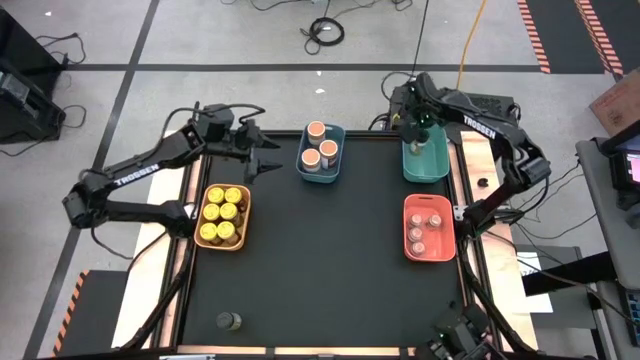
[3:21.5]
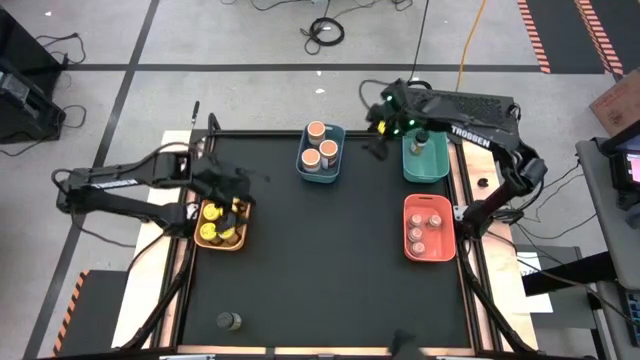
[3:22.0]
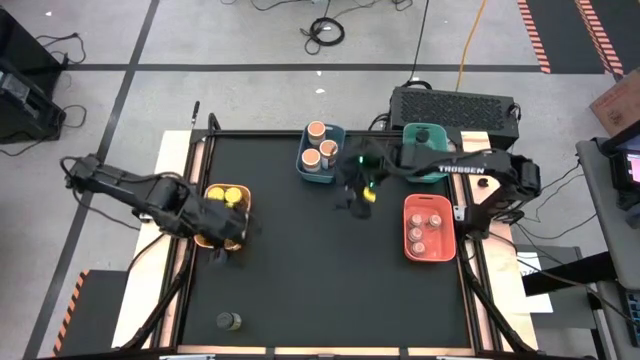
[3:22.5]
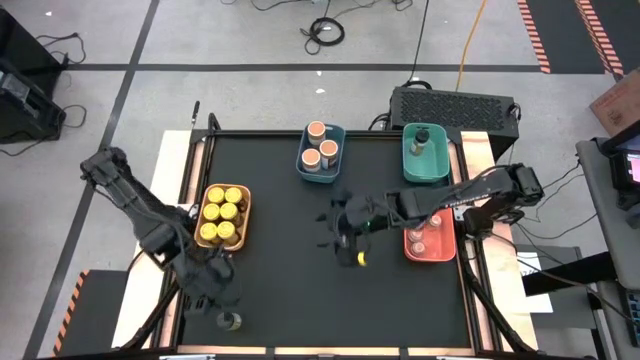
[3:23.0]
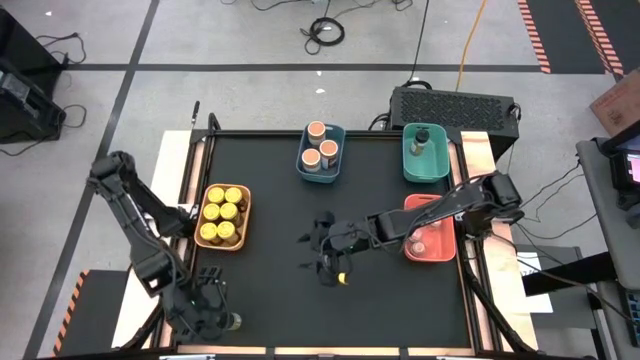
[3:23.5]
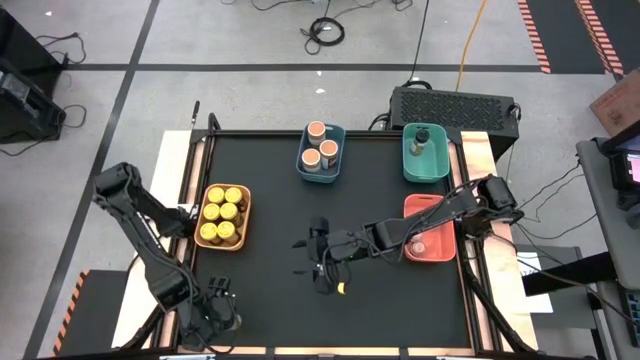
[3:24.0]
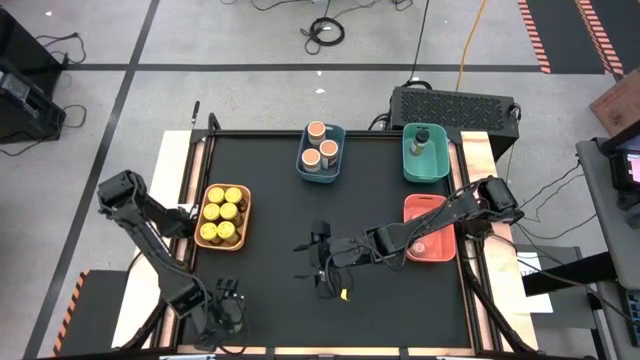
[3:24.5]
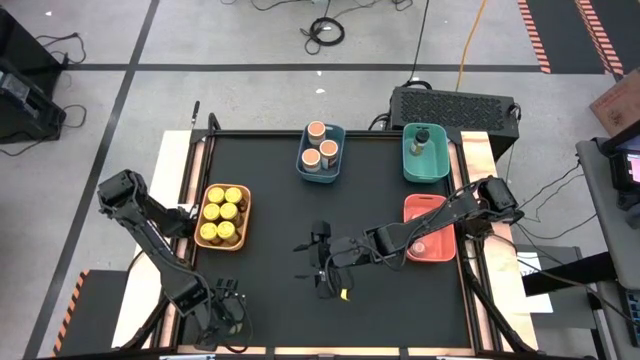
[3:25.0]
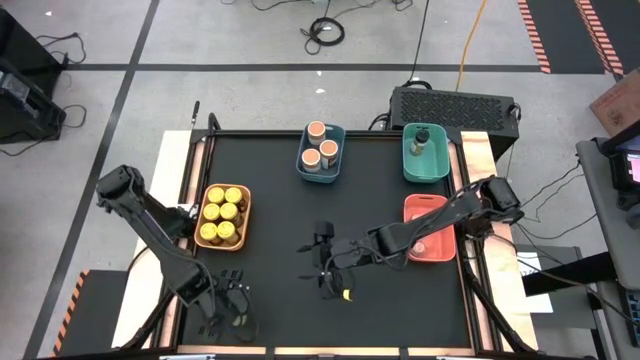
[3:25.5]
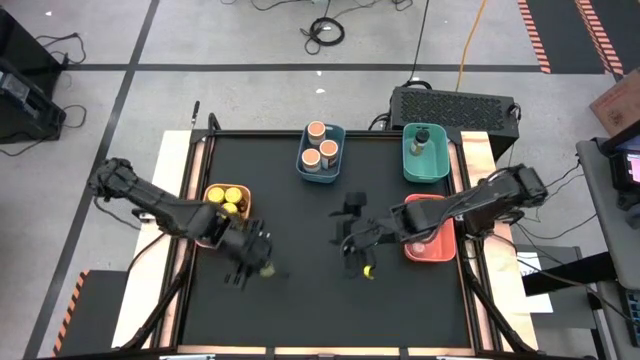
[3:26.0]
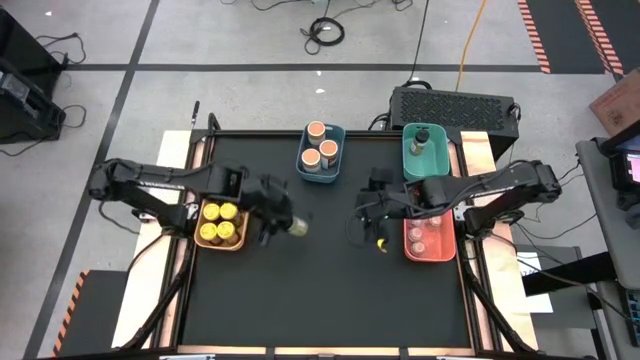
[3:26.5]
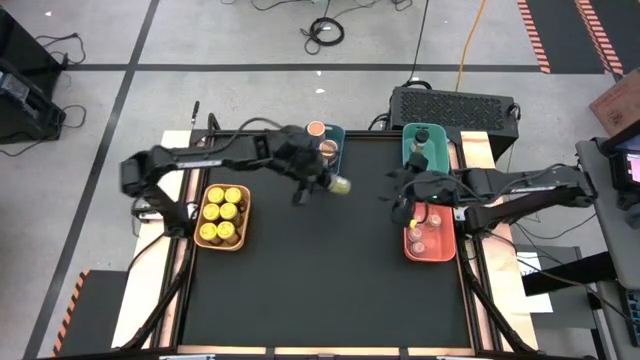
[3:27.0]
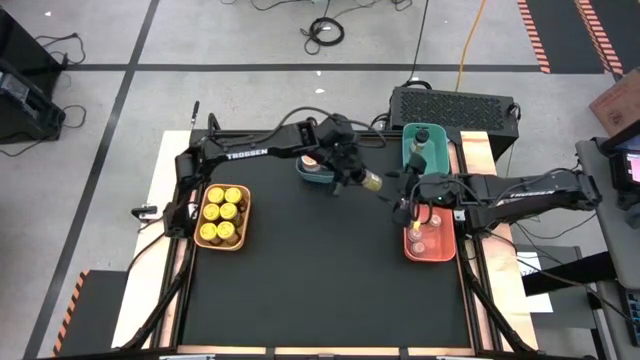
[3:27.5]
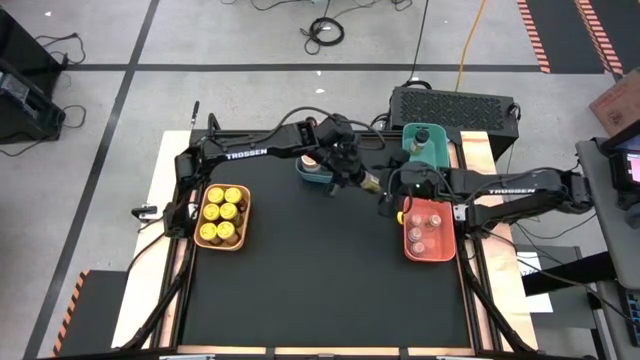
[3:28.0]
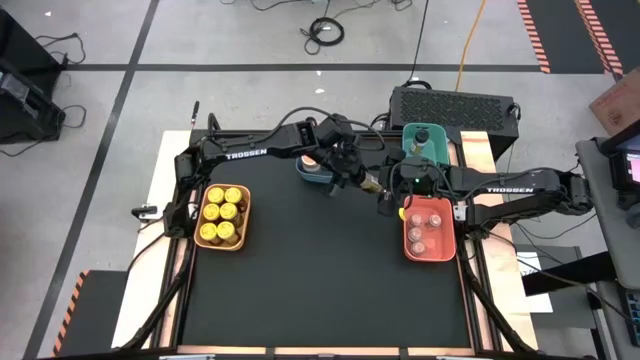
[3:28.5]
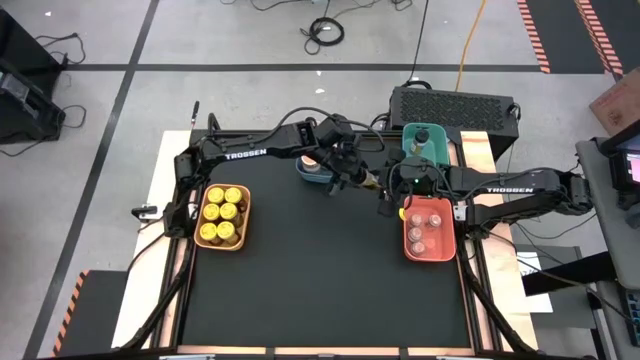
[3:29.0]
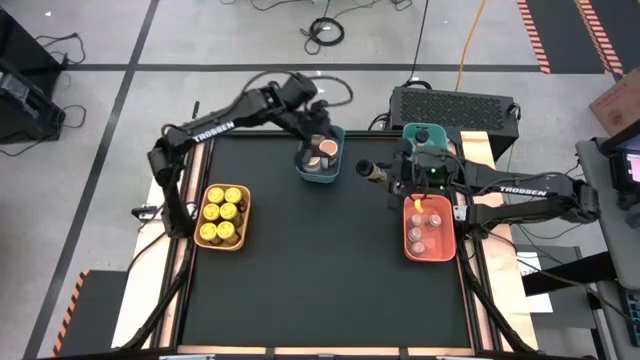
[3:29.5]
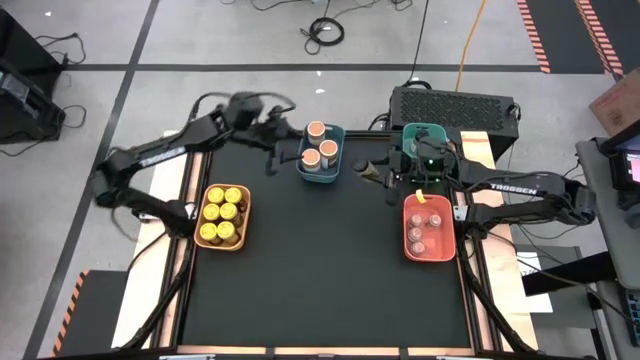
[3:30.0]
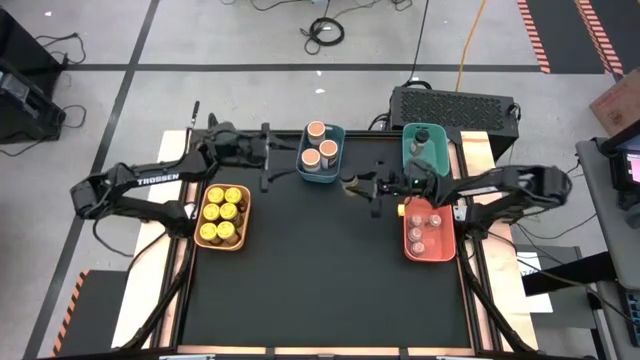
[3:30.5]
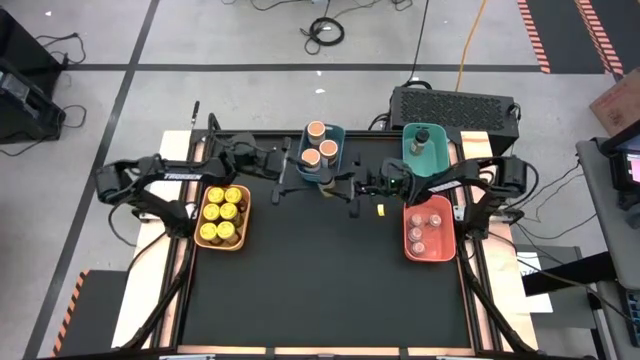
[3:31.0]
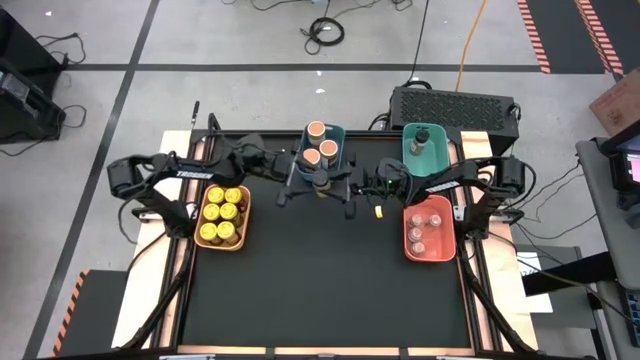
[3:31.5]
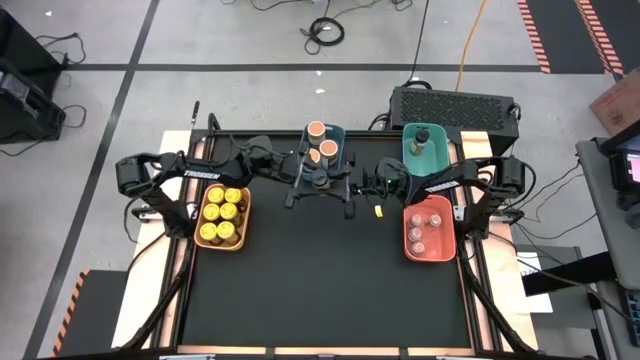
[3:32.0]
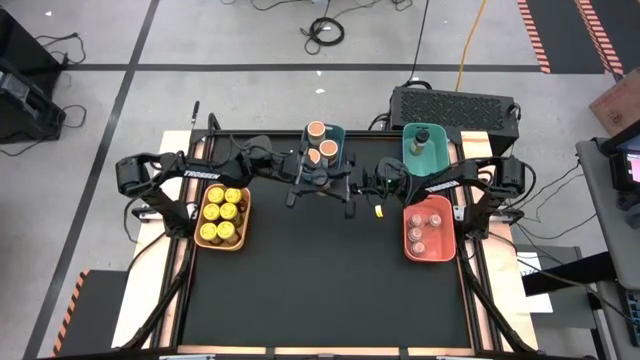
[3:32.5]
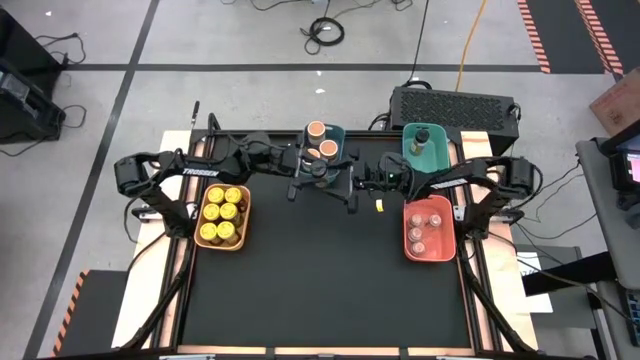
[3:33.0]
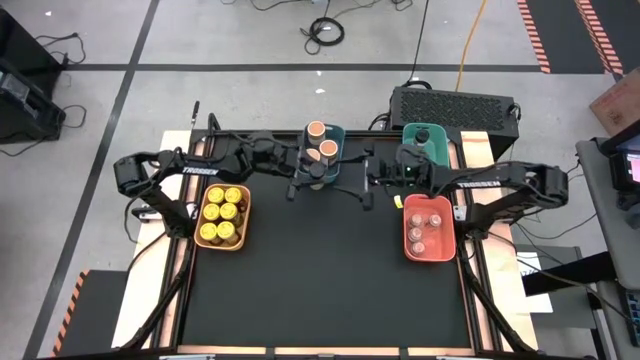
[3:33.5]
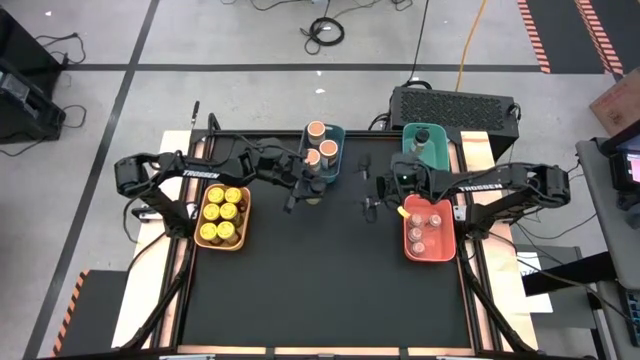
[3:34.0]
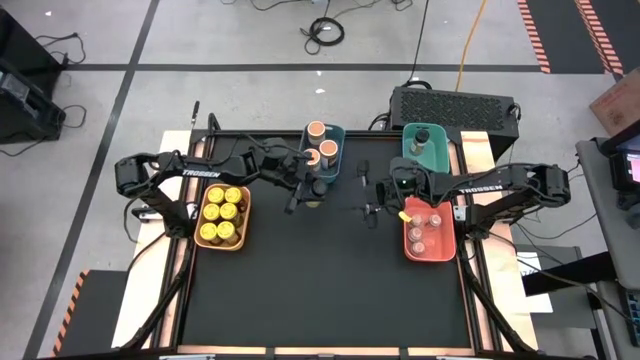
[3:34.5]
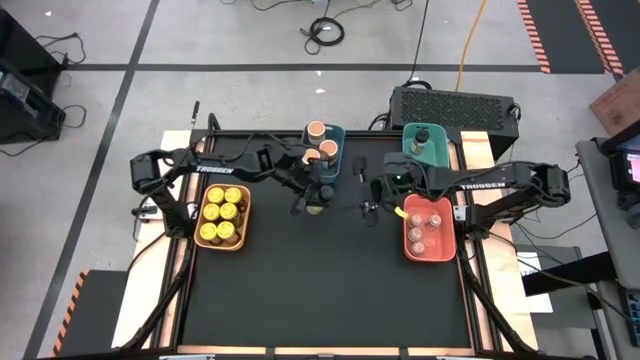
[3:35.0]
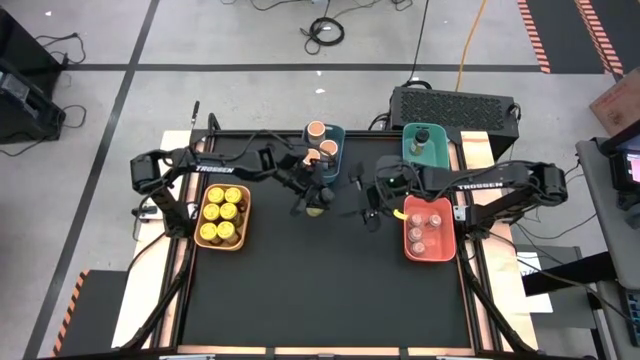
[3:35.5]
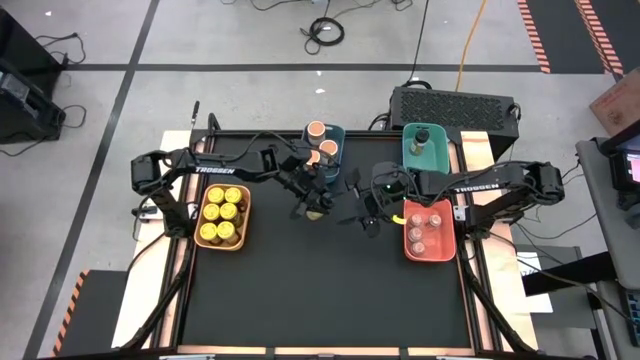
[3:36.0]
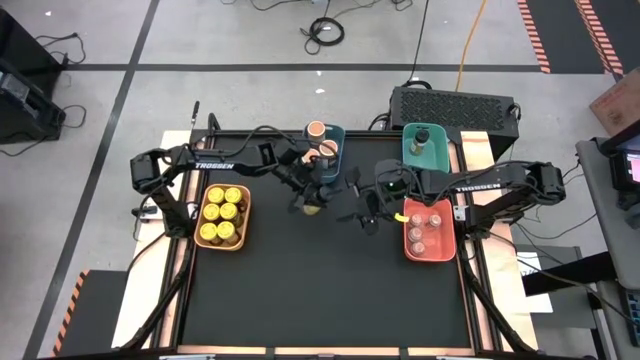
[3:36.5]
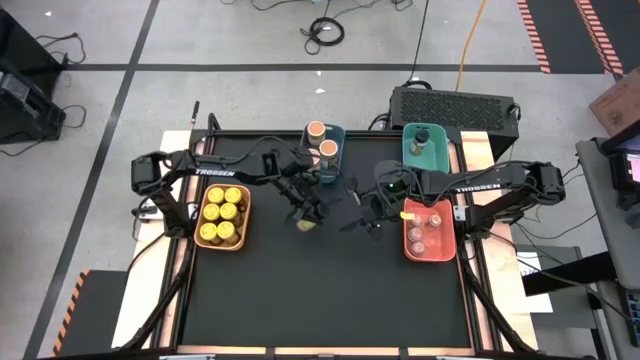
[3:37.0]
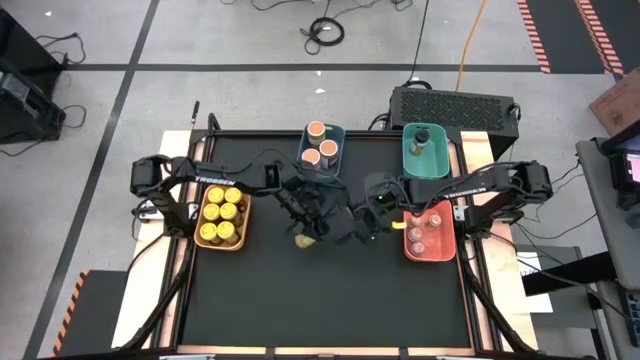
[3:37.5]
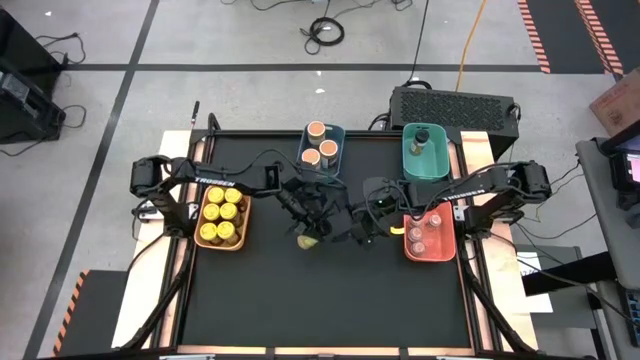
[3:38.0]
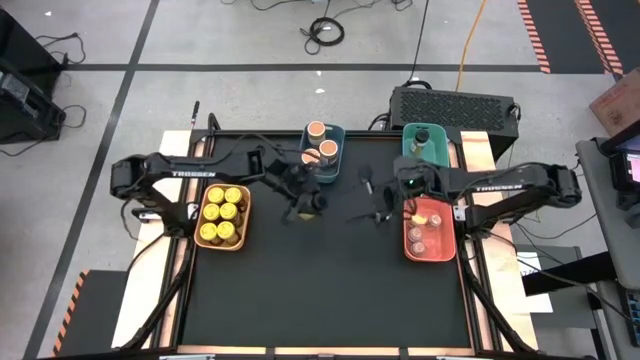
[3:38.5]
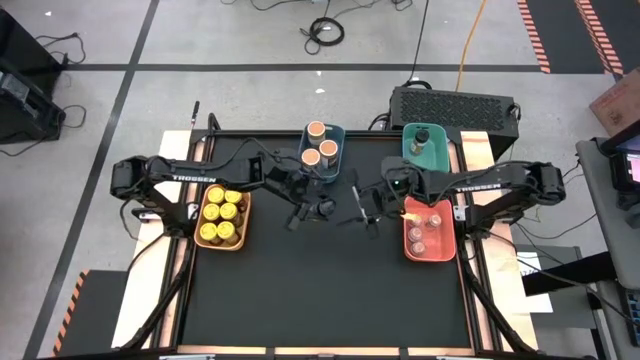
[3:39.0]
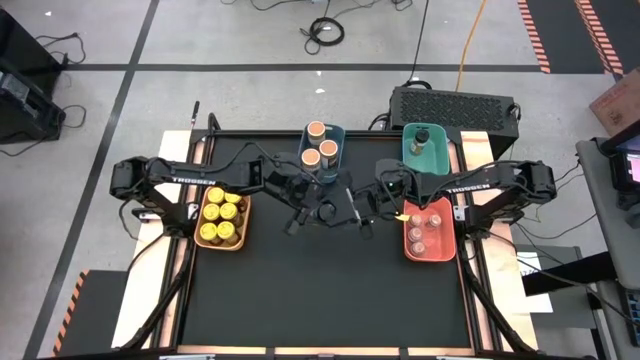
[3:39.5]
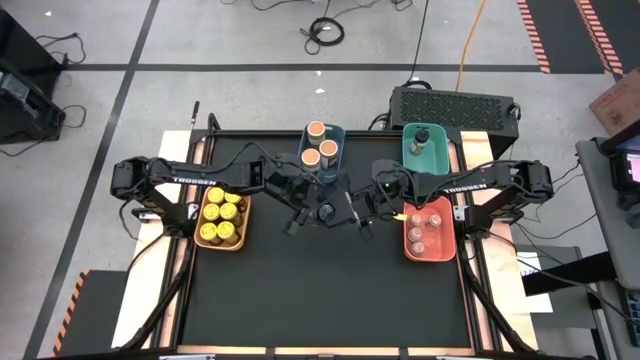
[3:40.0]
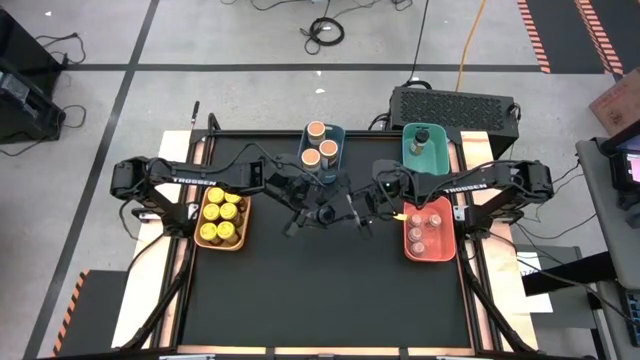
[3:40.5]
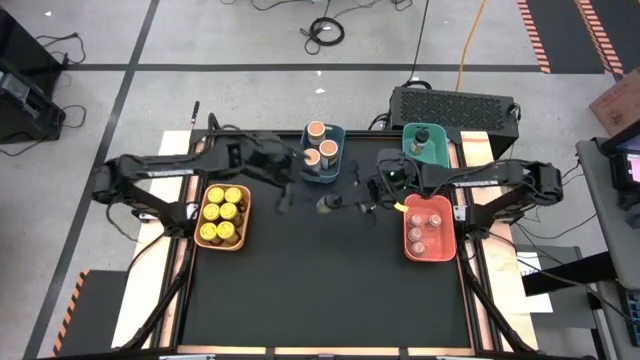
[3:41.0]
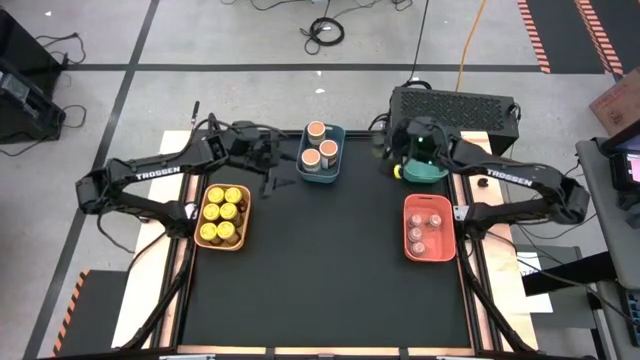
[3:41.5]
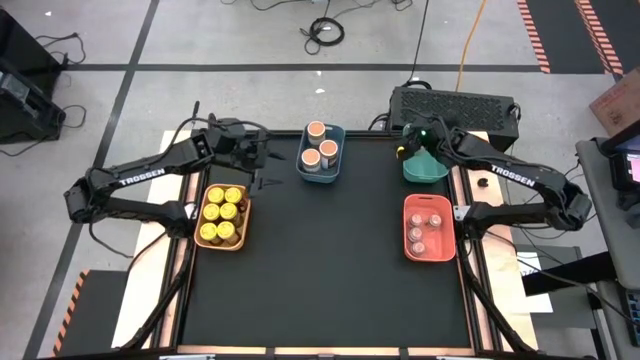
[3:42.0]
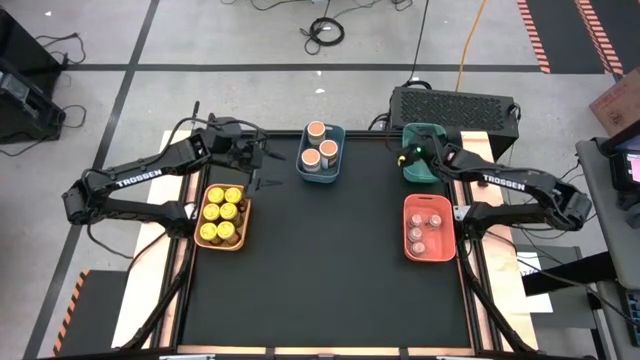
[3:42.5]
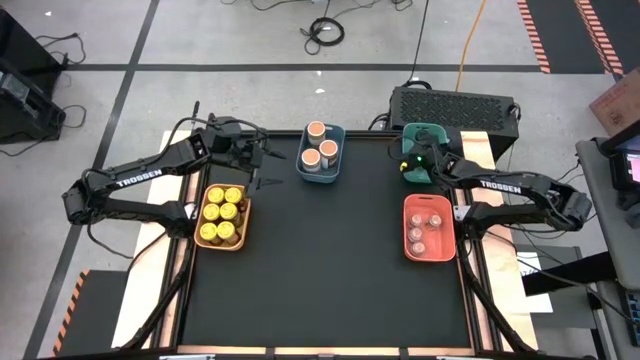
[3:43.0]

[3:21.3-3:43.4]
Task: Sort spices by type
Put the black seasoning bottle into the light green bin

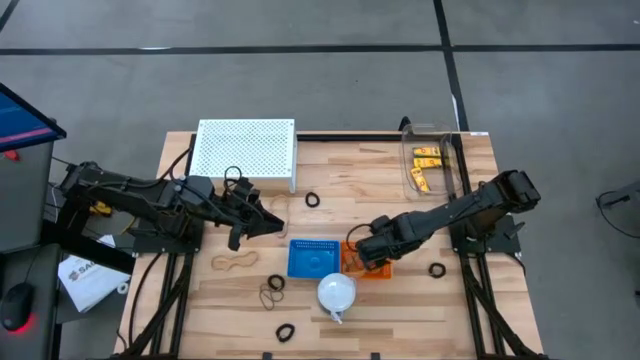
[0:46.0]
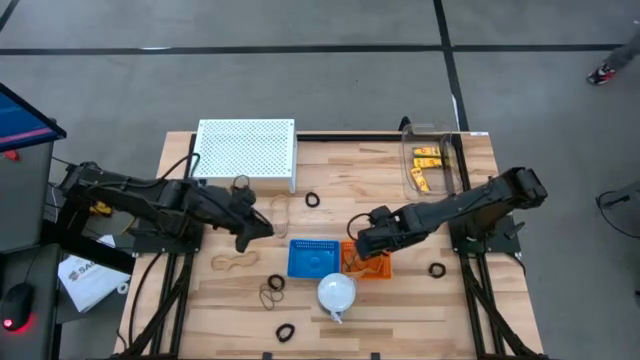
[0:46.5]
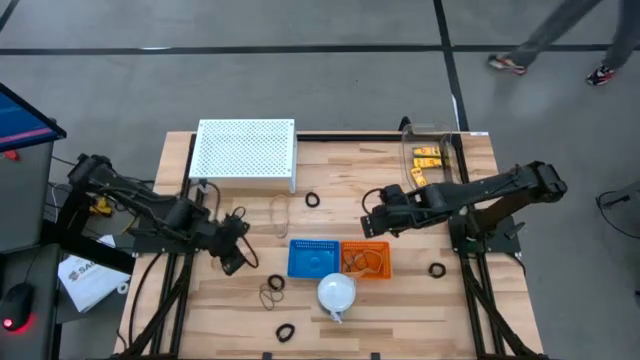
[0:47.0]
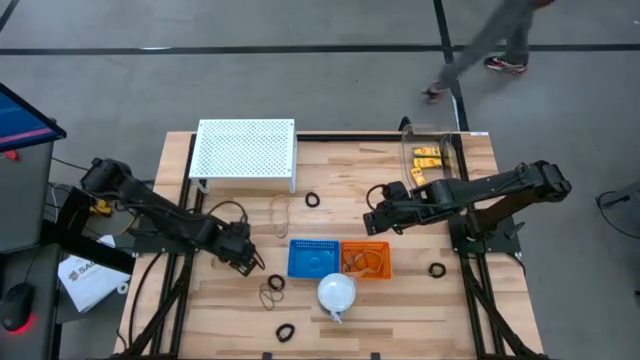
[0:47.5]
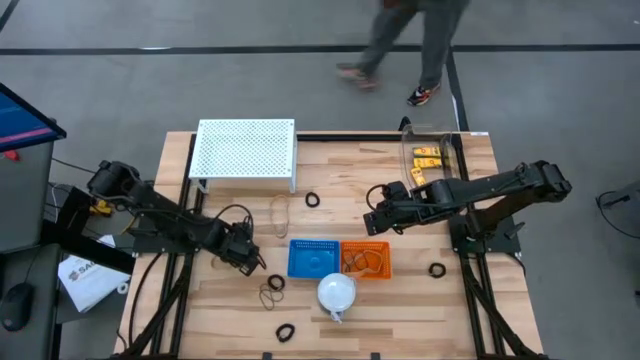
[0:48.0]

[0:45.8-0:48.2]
Task: Pick & Place Office Desk Supplies
Put the bottom brown rubber band into the orange basket
